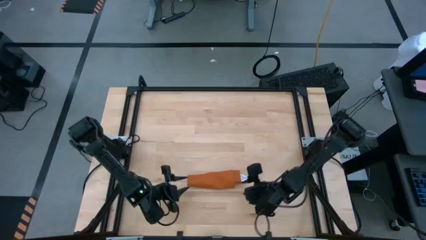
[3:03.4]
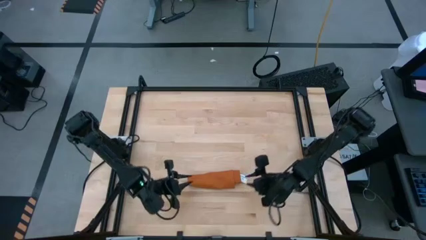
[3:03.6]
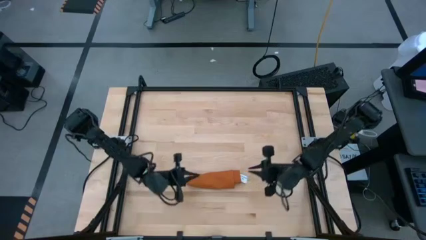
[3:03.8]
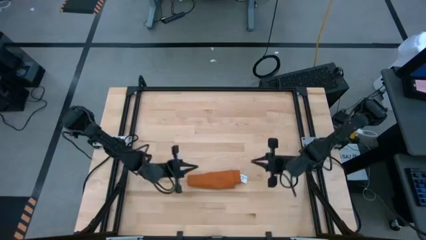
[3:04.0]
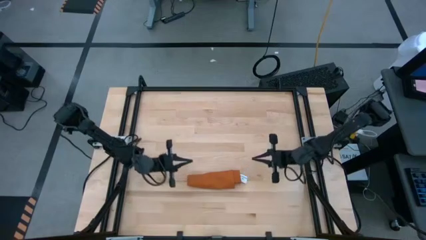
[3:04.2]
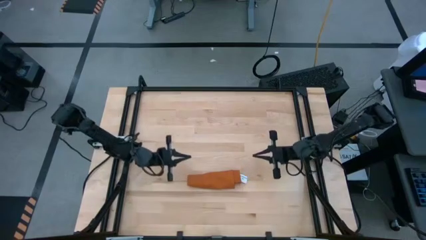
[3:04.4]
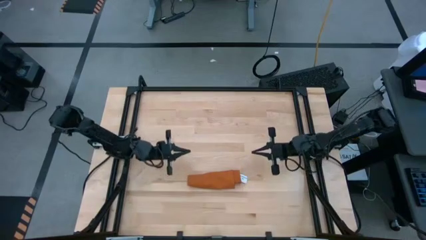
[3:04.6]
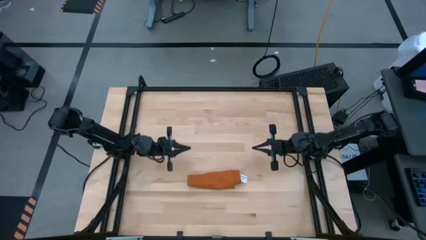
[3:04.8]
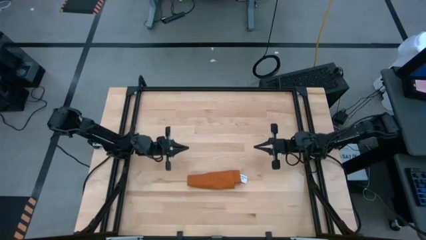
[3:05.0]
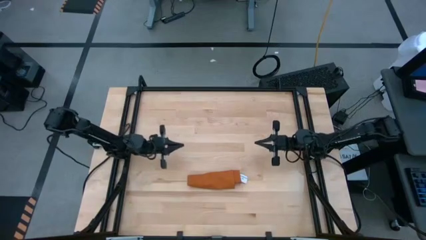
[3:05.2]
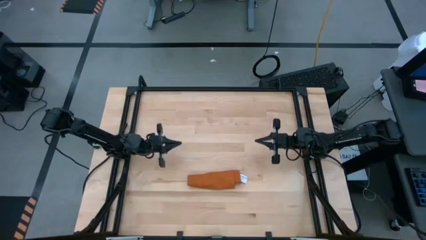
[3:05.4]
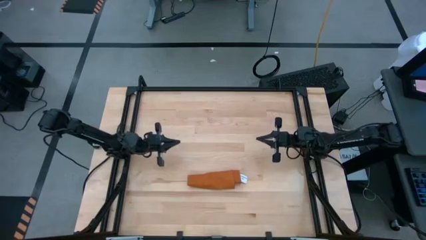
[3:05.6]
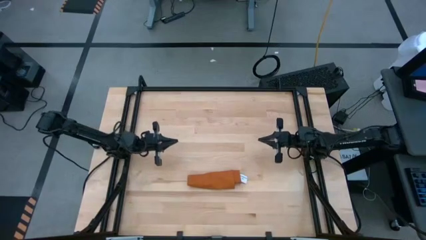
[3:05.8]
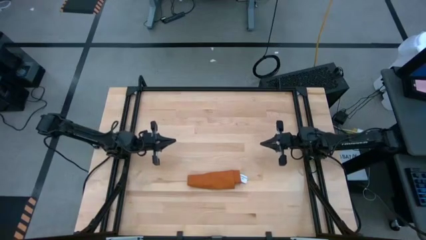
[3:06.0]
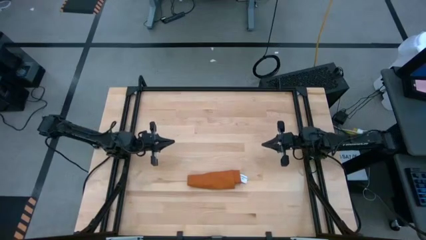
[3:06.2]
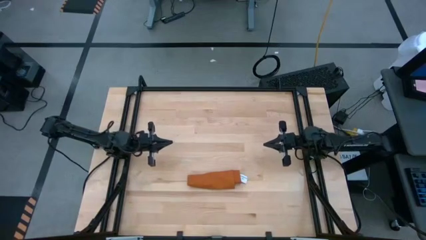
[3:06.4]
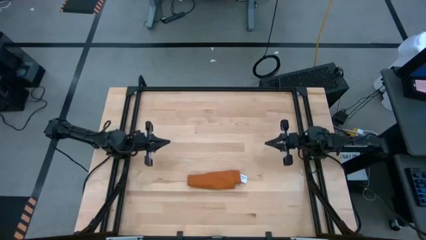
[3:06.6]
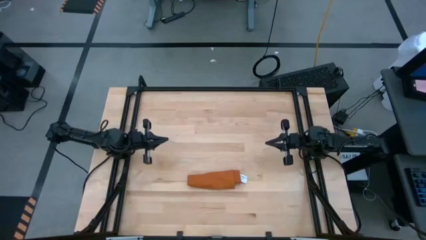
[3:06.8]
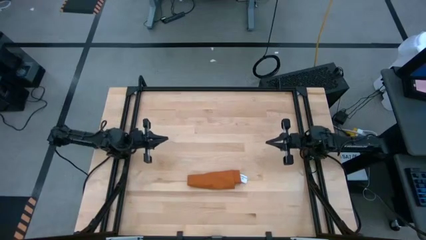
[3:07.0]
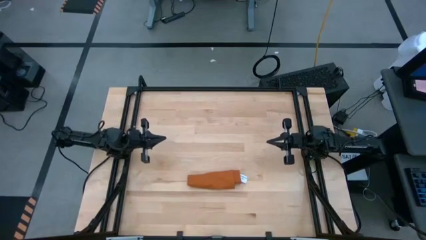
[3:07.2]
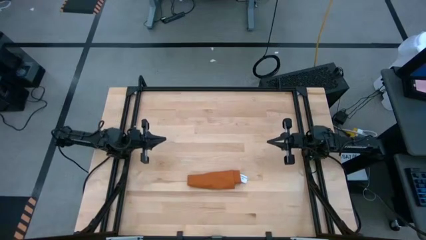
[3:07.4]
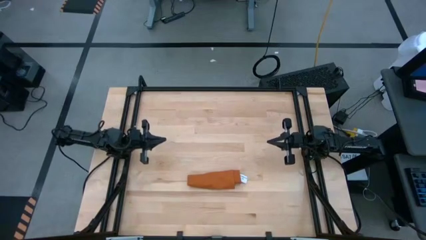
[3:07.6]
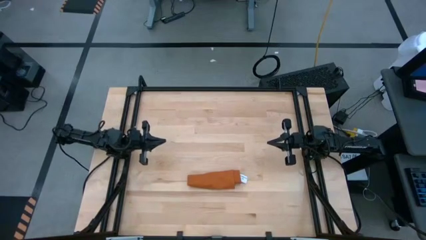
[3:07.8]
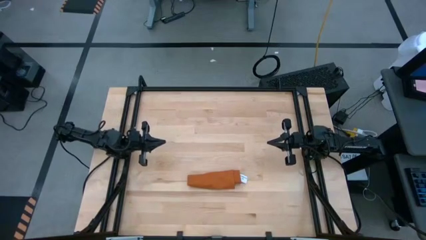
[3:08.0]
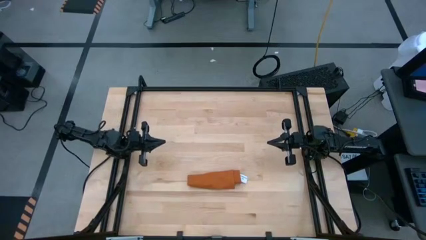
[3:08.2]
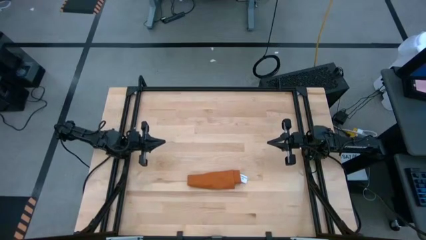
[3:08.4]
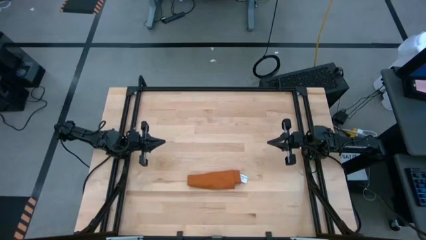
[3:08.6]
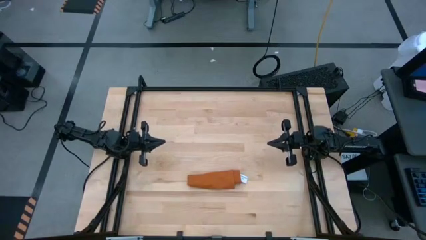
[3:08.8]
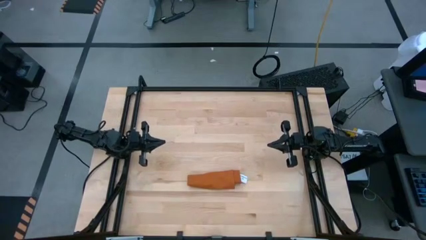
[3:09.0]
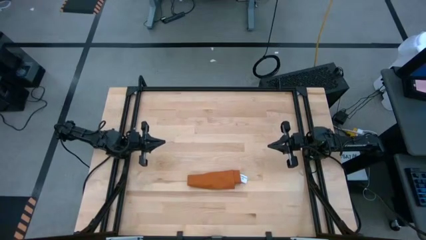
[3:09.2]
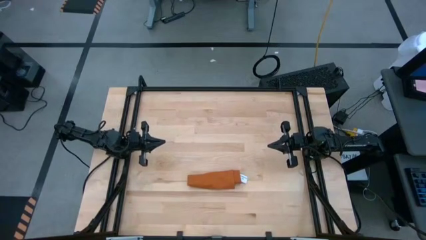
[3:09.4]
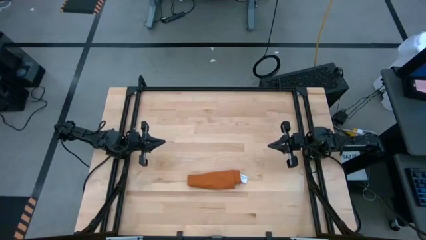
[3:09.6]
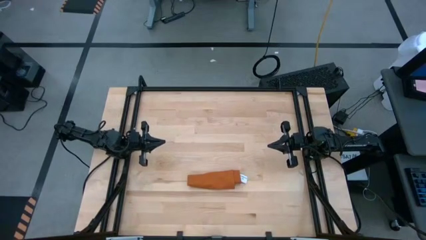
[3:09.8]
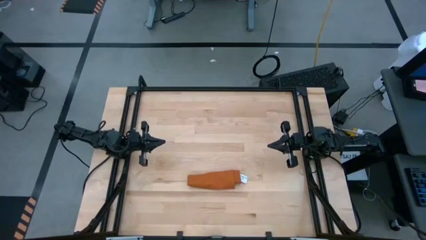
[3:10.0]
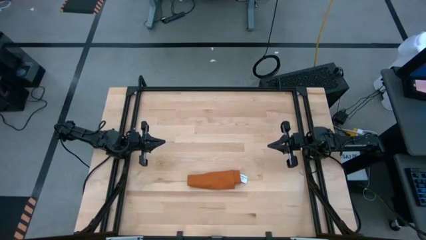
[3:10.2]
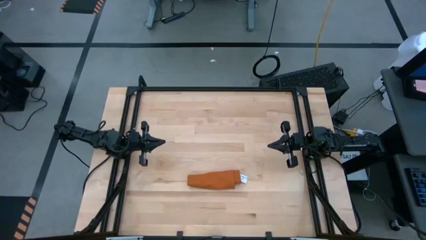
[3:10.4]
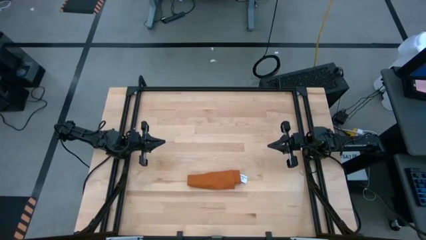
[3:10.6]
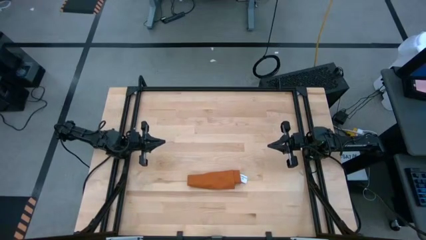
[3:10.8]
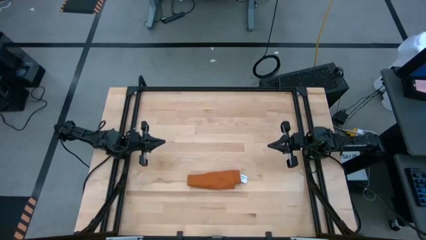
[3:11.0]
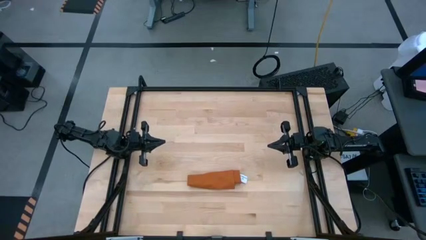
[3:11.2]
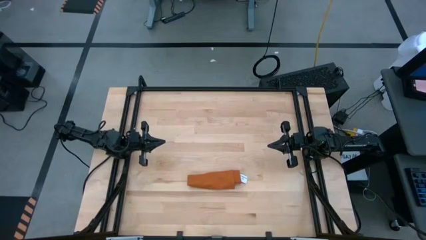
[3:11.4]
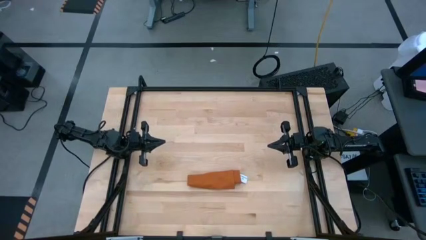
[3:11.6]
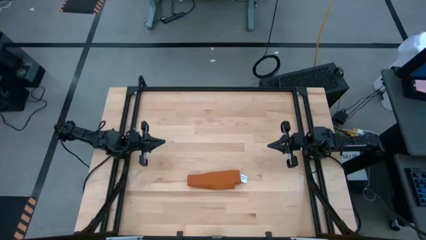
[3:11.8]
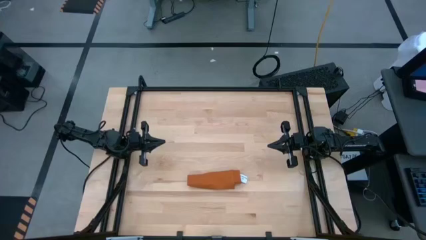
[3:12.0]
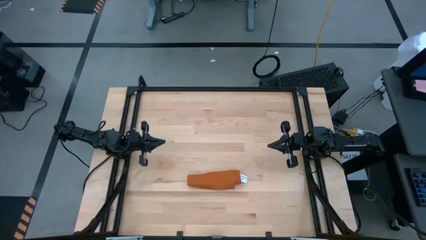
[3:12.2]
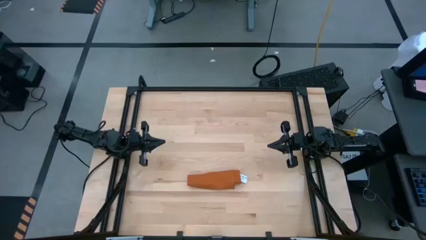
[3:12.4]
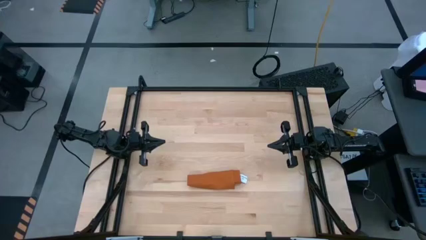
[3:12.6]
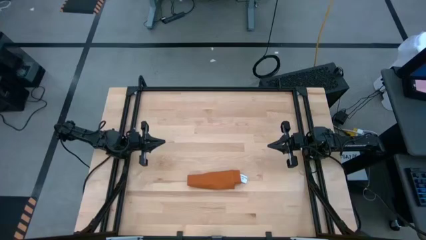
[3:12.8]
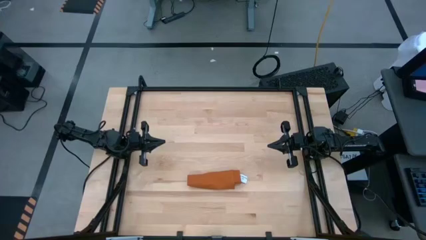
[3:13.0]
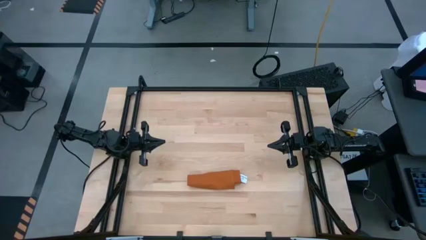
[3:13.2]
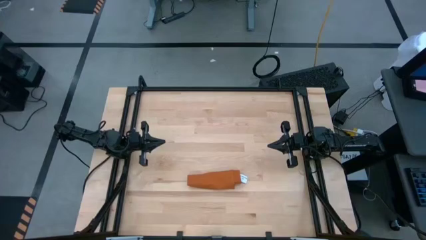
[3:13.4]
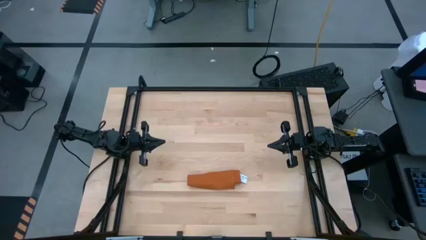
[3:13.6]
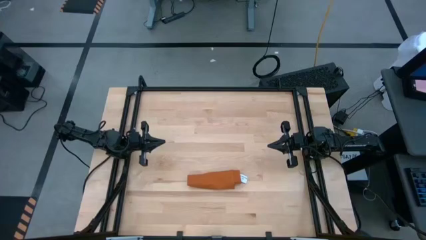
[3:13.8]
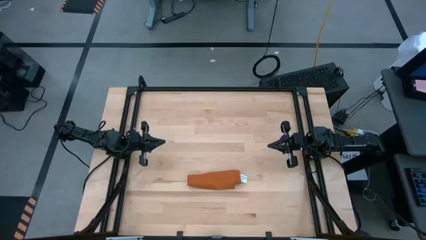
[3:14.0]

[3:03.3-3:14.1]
Task: Roll towel
Return to Home Position

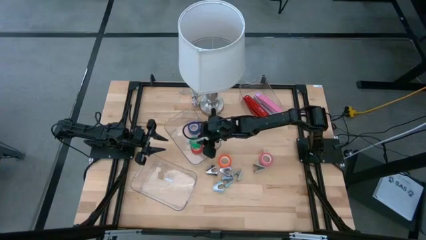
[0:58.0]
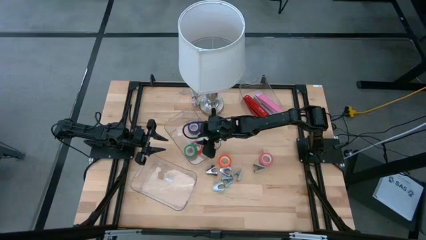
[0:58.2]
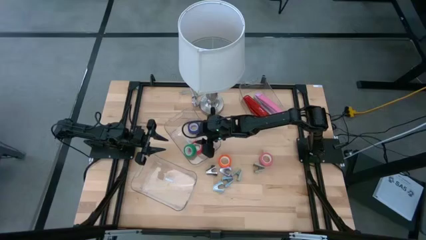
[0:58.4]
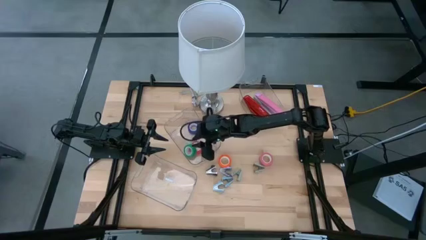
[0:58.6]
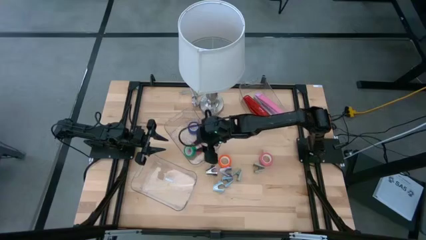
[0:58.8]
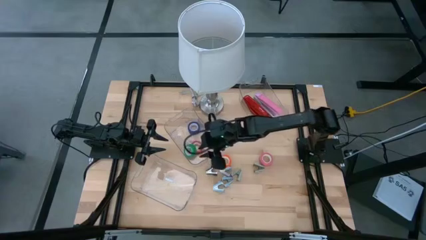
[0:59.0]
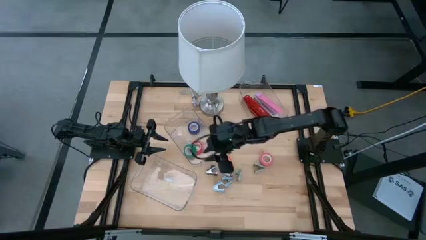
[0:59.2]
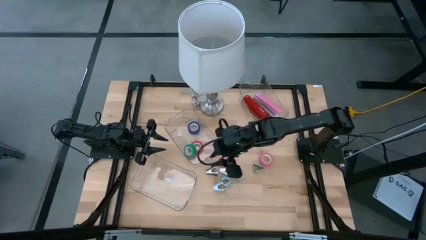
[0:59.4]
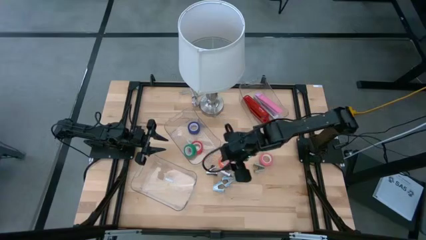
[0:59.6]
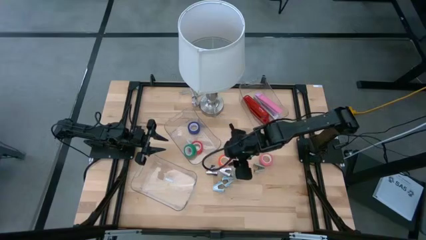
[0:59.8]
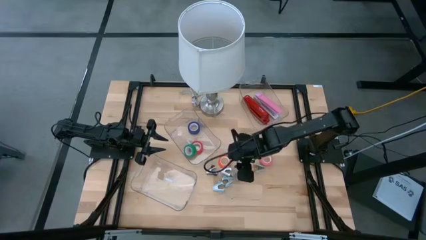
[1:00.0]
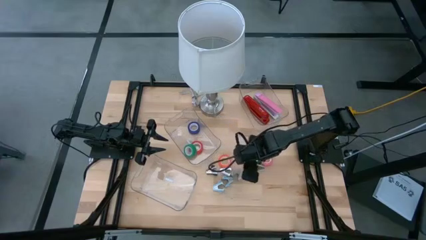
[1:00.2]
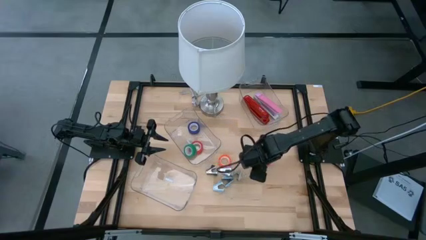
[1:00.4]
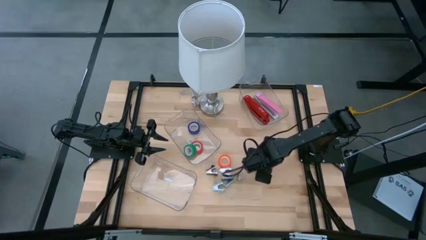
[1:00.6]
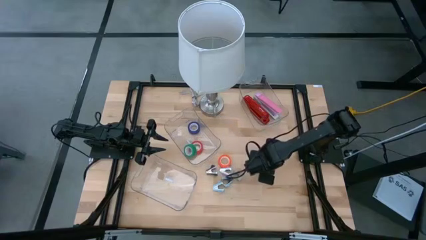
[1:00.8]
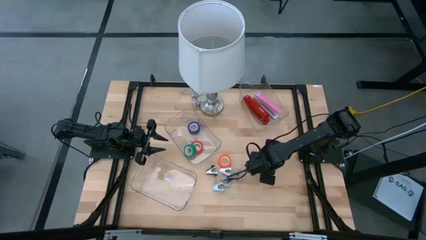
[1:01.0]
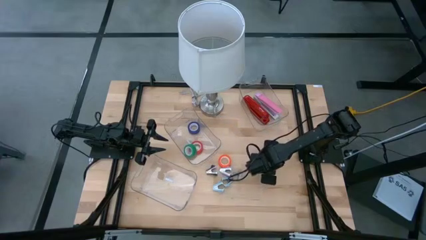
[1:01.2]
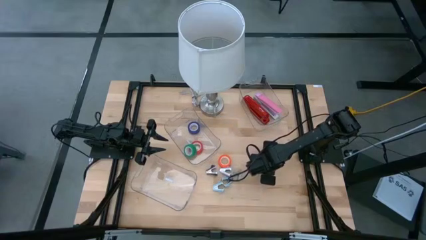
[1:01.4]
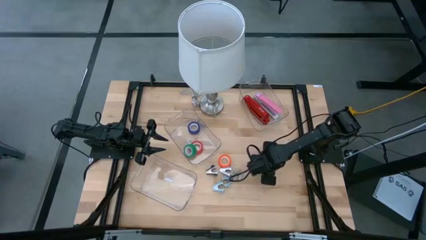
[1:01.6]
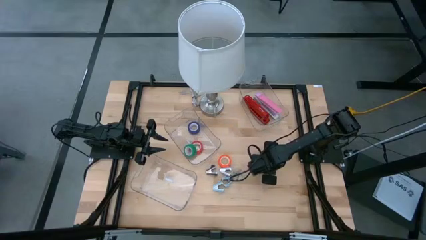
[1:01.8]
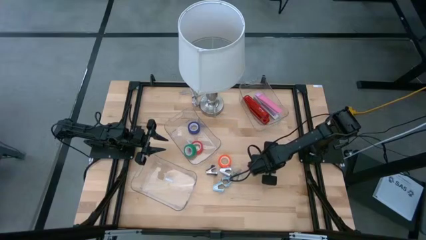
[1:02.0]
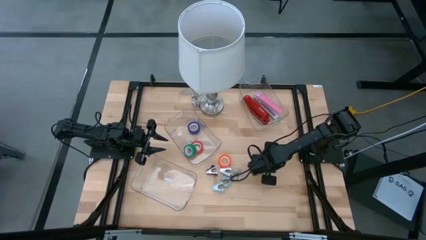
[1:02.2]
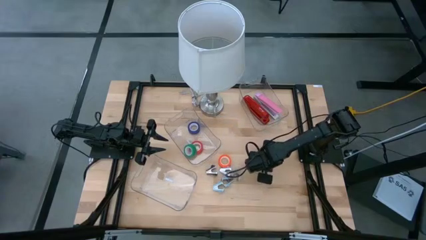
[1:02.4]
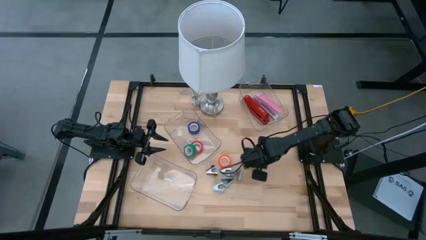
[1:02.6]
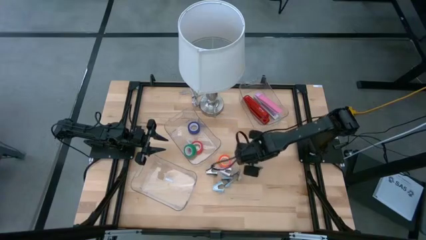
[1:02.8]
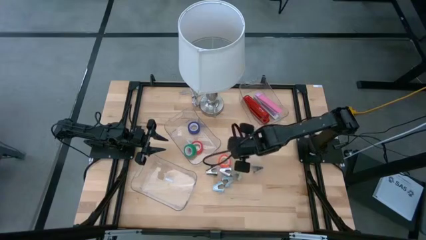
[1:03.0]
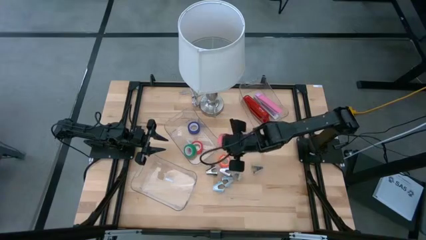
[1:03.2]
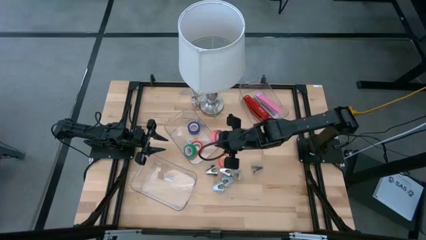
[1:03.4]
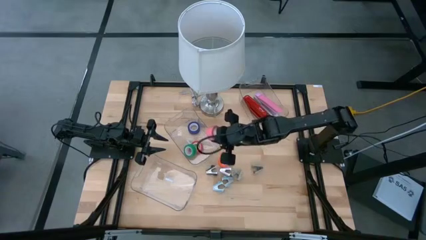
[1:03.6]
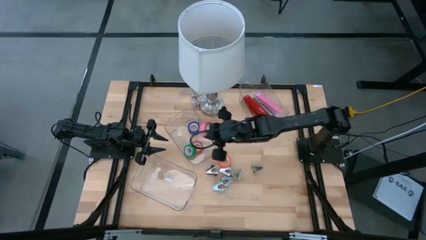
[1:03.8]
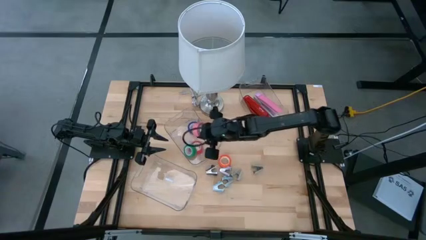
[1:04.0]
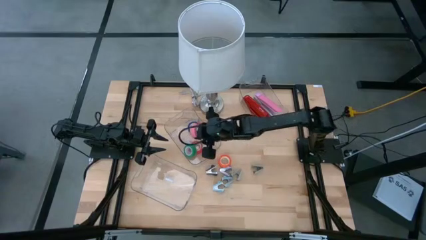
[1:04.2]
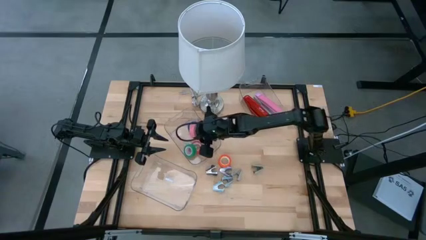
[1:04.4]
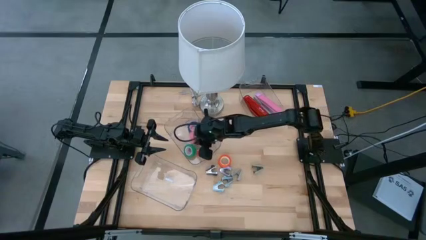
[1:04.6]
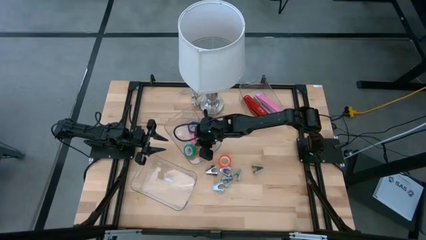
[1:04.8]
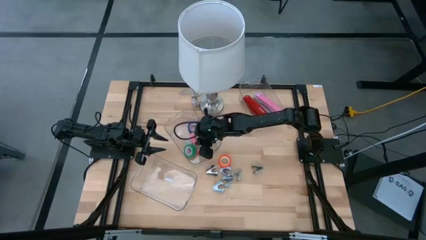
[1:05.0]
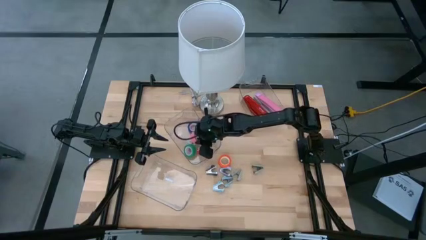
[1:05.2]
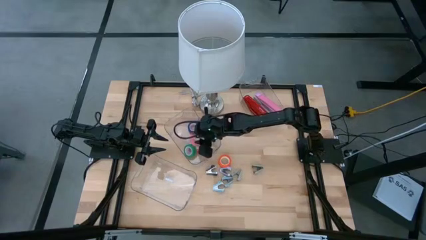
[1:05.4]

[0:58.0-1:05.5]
Task: Pick and place Stapler, Stapler remover, tape
Put the pink tape into the middle transparent bin
